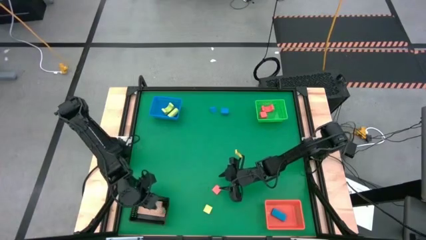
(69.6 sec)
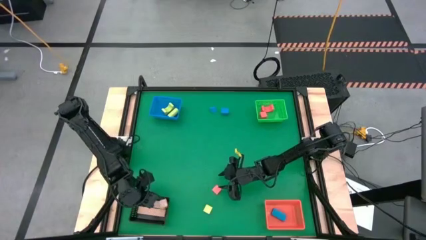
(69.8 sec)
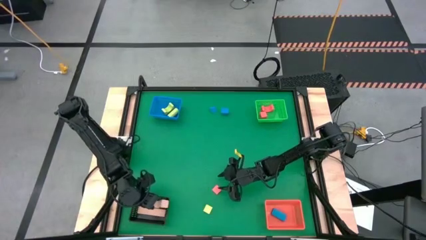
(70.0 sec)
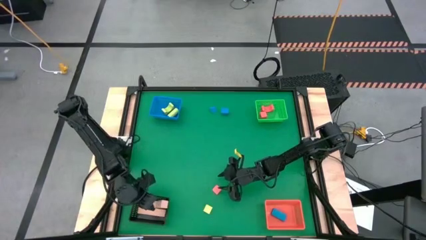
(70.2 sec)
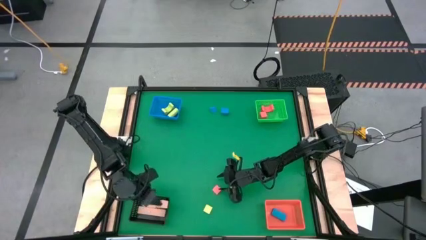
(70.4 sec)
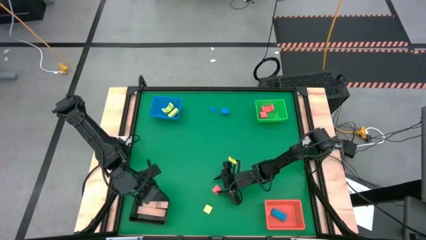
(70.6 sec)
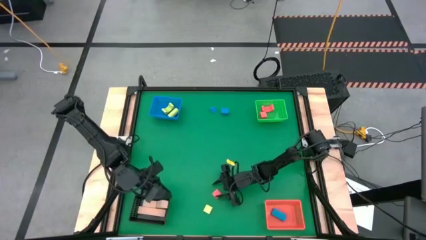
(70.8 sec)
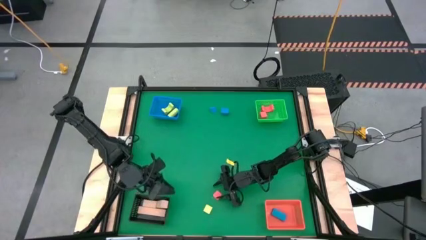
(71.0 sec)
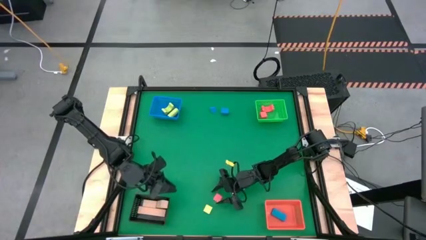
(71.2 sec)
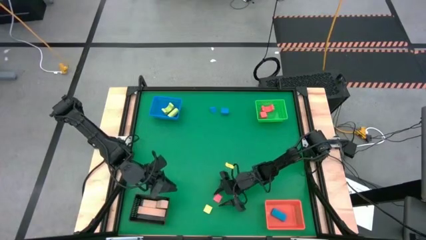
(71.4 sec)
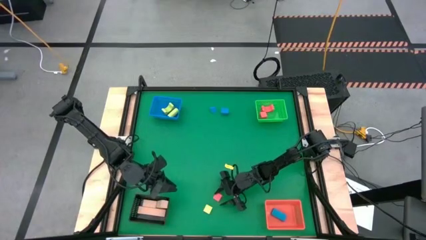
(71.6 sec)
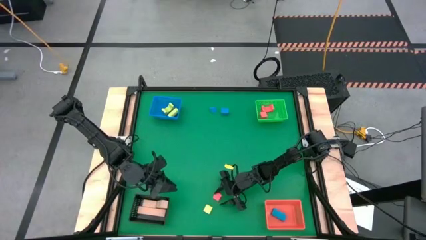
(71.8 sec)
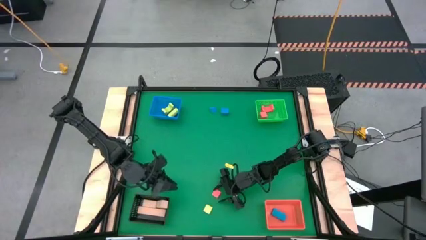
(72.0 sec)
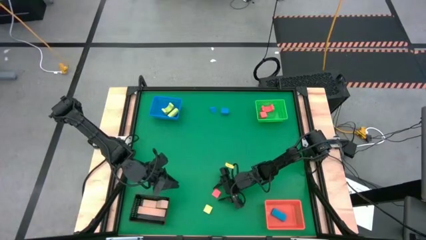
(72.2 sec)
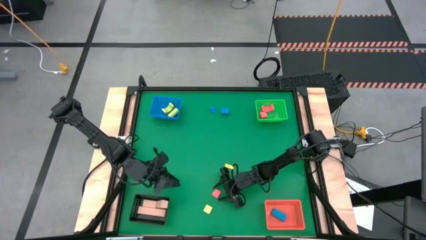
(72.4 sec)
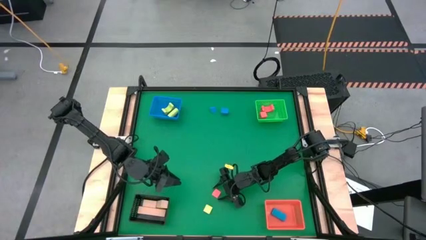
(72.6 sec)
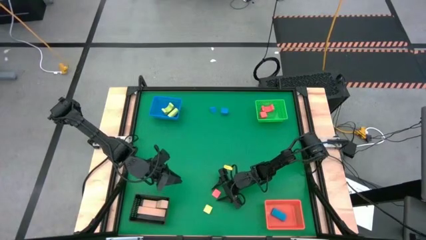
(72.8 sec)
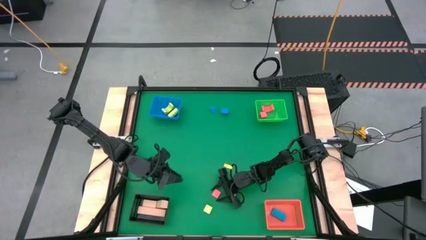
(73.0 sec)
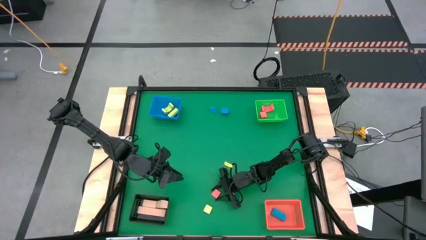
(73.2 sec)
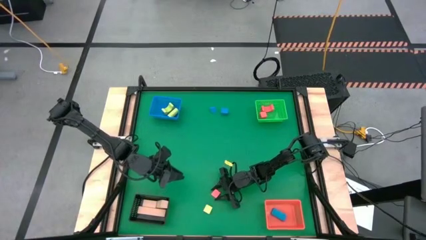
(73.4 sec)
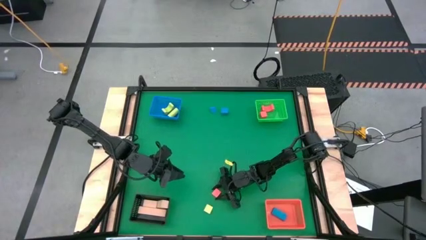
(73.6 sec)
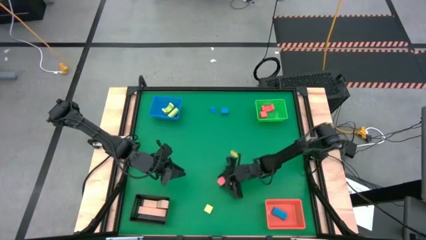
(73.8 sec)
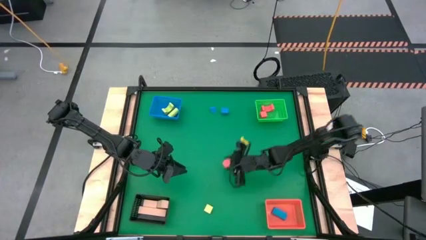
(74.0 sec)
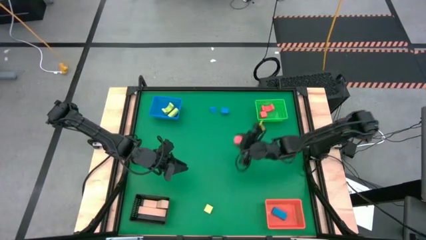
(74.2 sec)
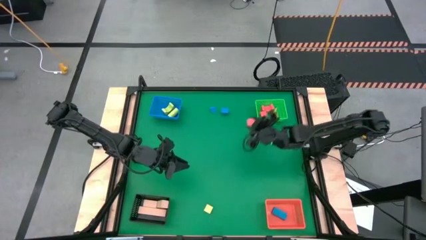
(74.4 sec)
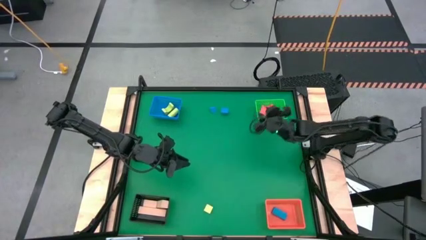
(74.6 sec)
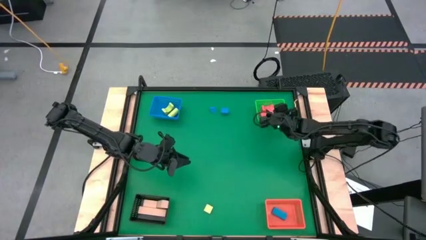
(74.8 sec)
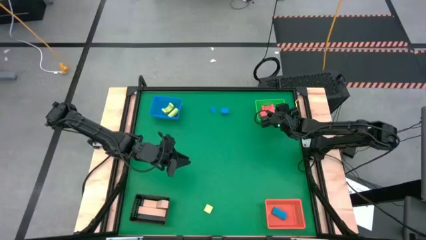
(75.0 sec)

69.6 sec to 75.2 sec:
Task: Sort & place blocks by color
Put the orange block into the green bin

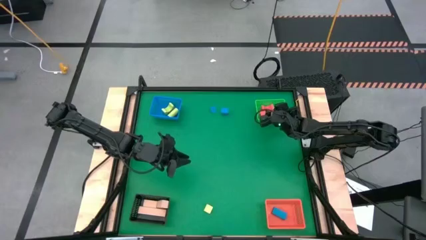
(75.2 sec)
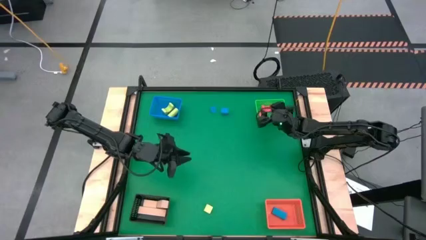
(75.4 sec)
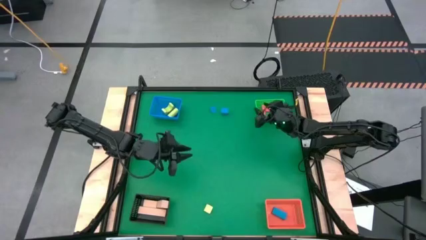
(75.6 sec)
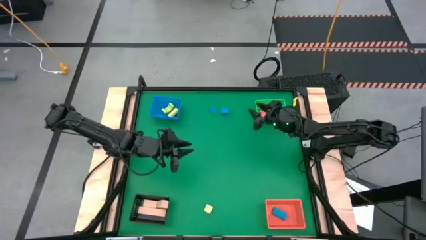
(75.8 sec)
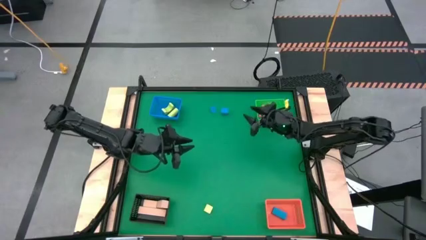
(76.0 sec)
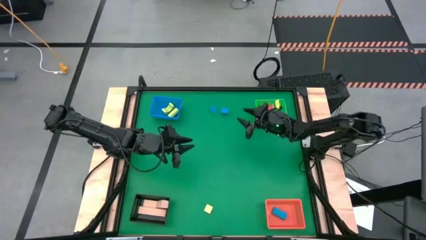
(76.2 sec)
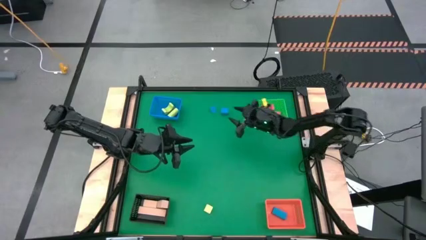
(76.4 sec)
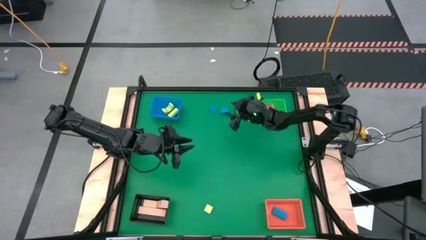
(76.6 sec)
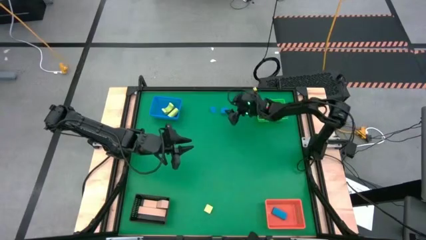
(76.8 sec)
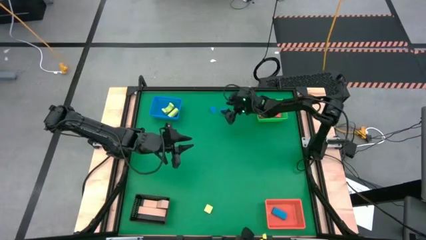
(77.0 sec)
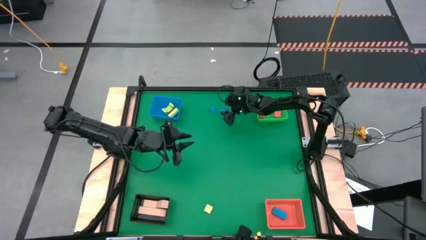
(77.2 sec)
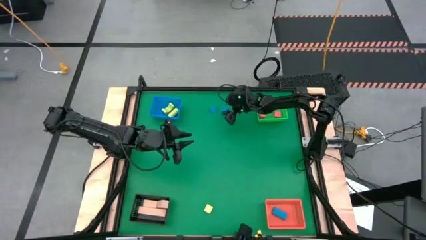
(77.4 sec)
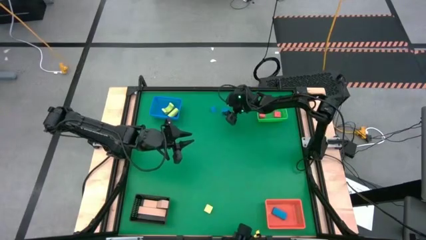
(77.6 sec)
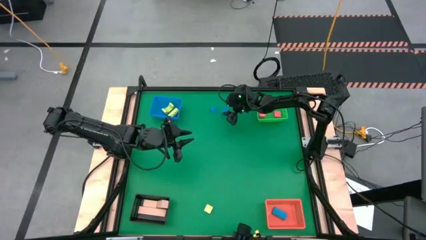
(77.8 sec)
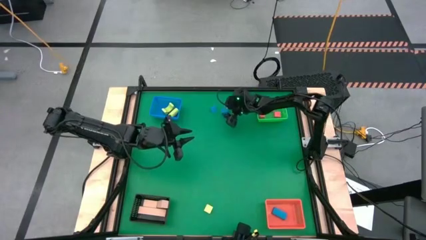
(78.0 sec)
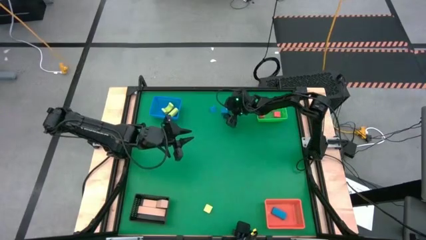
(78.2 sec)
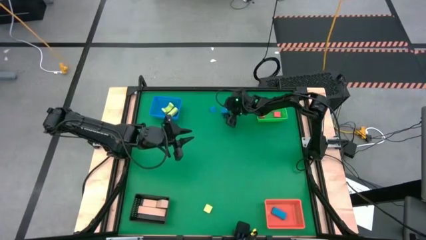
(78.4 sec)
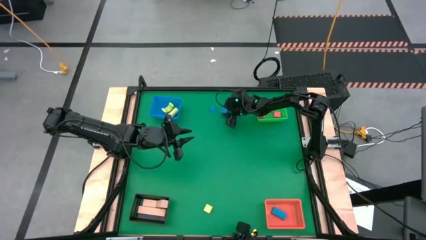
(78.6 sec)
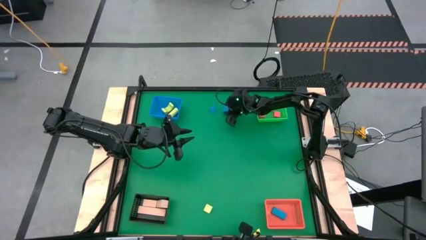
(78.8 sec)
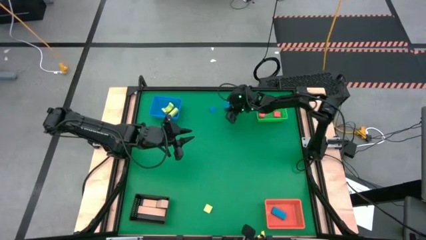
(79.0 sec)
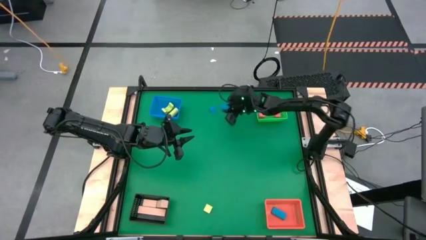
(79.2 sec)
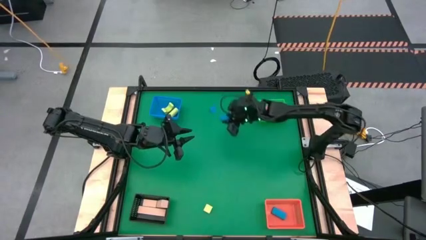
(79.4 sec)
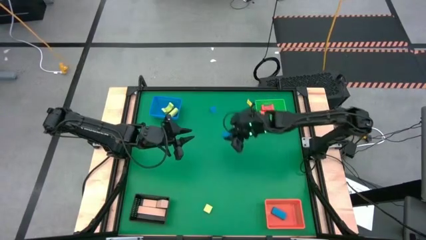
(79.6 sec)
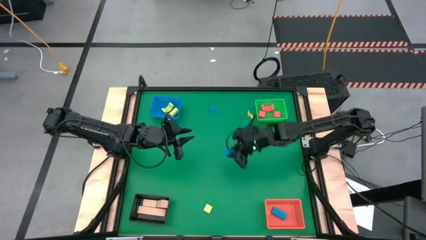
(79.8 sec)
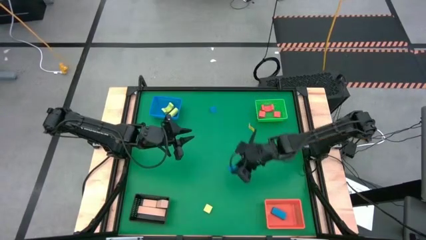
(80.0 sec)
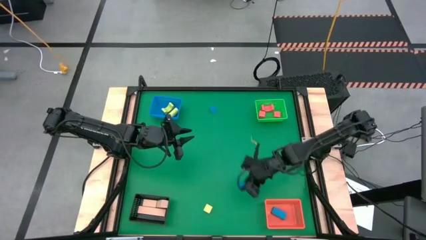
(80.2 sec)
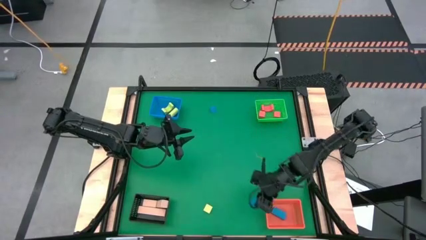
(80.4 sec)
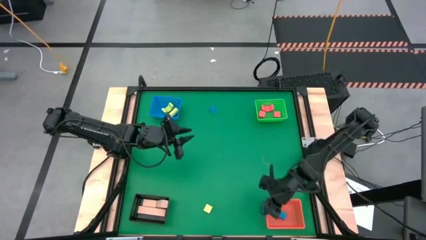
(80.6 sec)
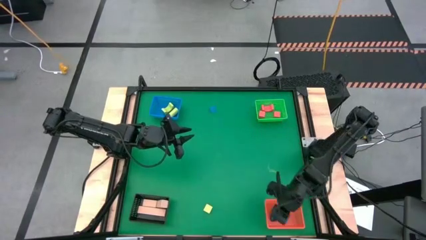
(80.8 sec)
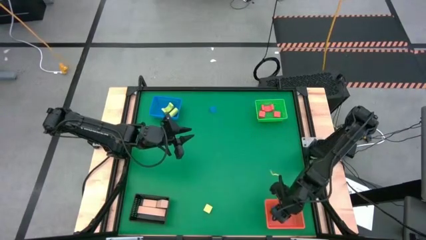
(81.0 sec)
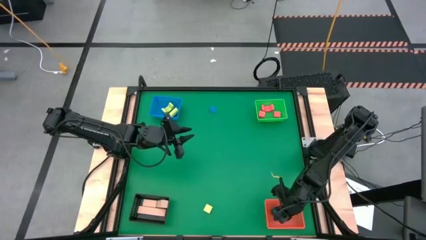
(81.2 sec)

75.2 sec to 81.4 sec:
Put the right blue block into the orange bin

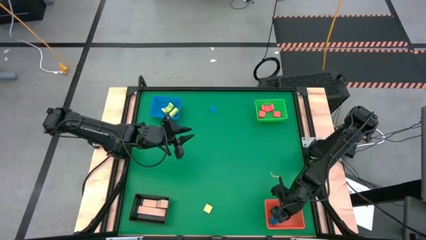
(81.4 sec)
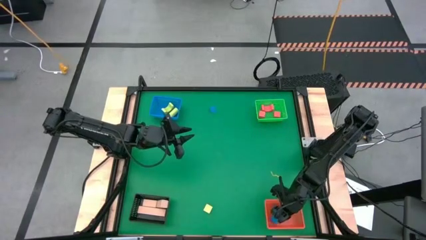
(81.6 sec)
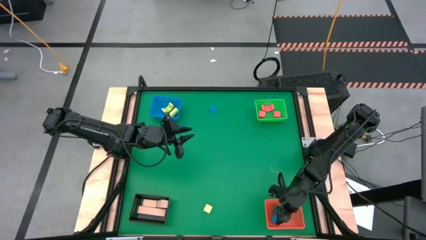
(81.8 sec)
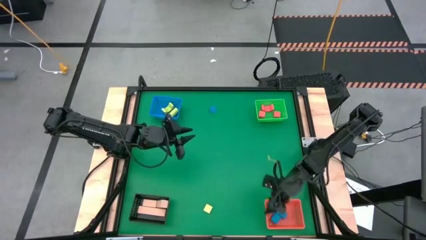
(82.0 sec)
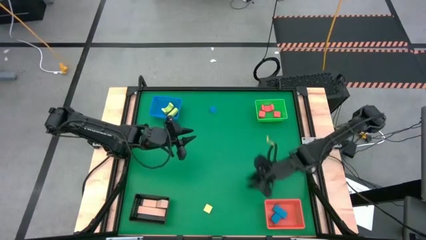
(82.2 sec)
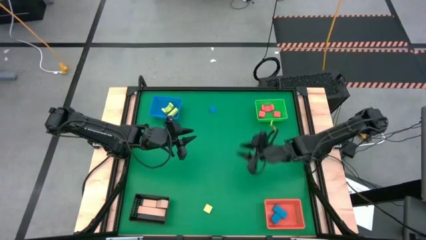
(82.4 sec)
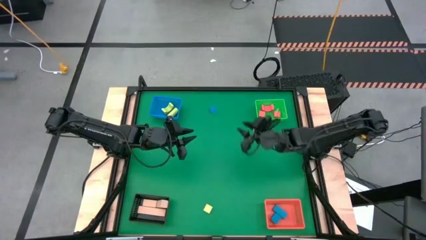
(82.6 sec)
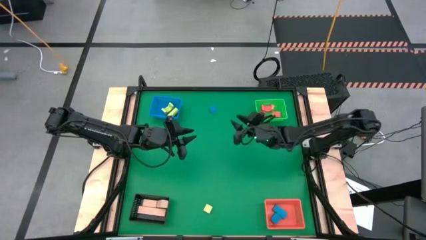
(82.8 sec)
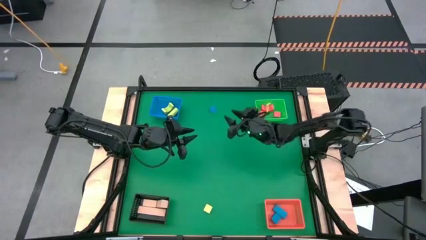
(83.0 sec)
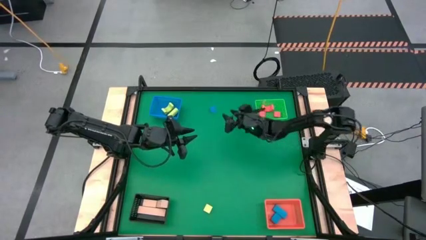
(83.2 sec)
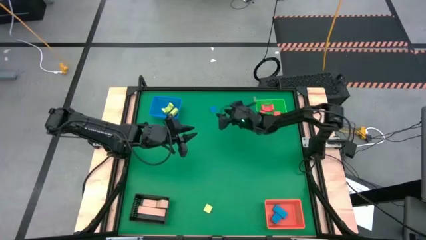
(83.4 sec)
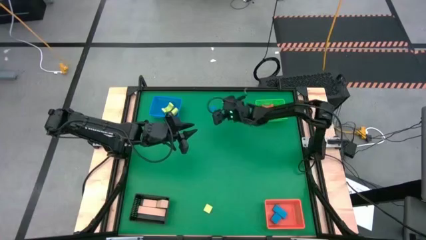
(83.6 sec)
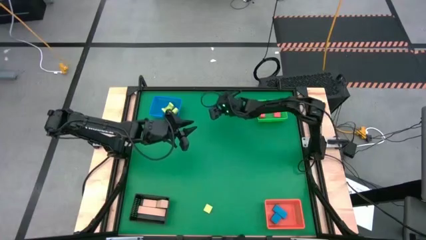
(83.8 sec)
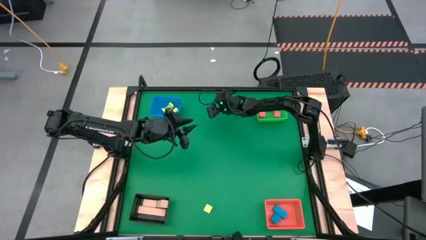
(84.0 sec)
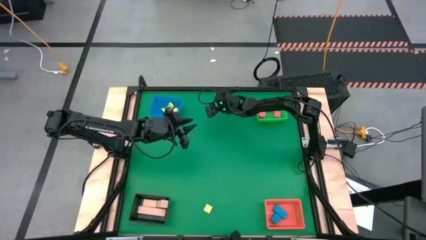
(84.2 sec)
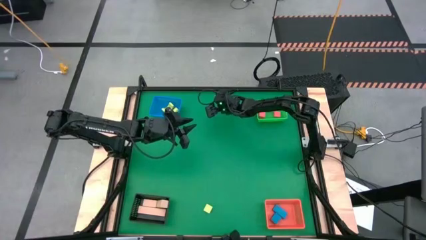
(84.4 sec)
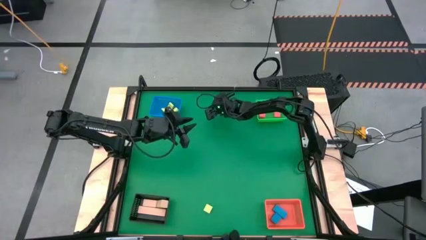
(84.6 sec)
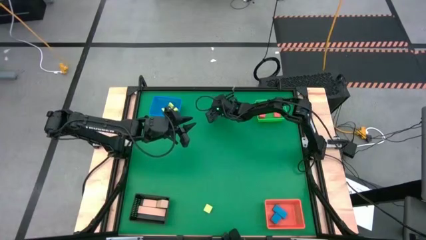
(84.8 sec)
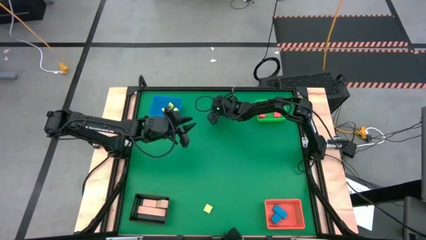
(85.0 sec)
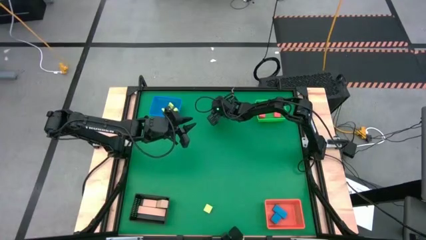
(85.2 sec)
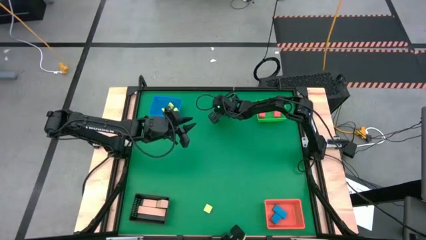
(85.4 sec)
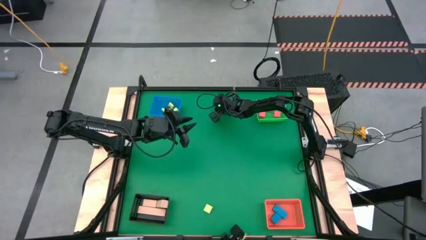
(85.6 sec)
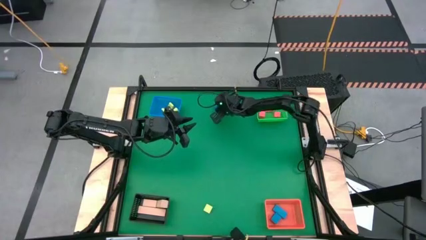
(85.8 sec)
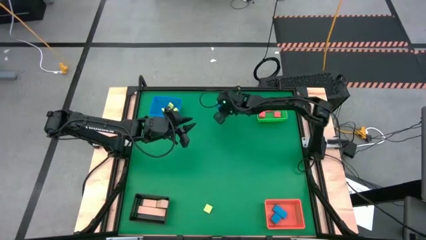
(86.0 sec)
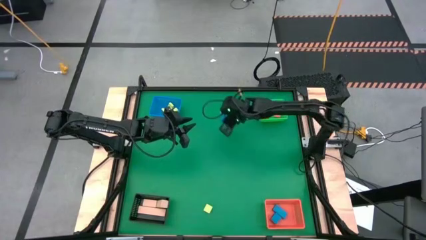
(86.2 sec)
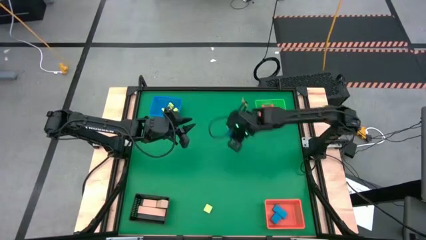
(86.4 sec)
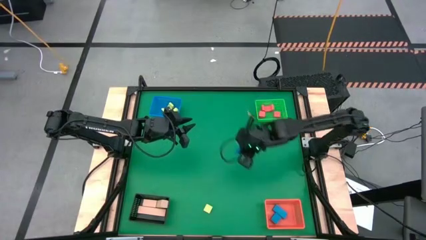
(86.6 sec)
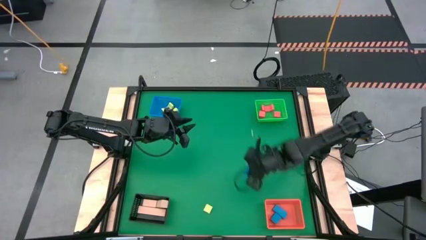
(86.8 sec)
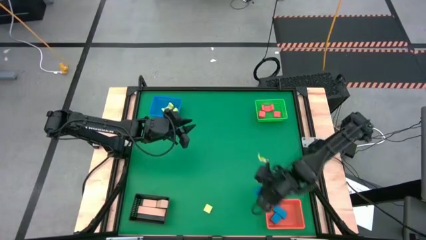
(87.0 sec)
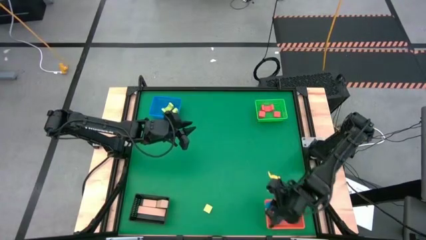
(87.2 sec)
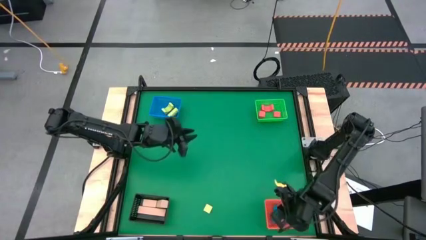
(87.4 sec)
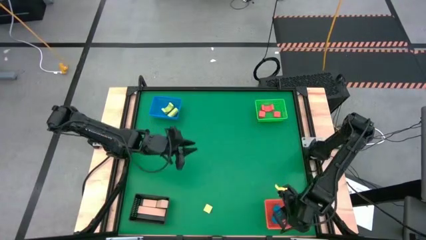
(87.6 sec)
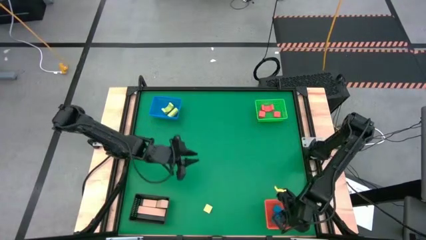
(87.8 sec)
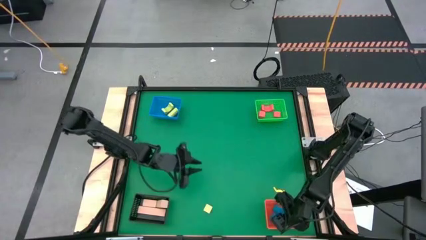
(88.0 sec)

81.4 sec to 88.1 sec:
Put the blue block into the orange bin
